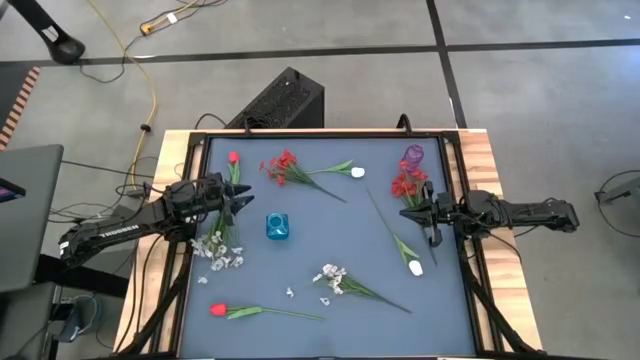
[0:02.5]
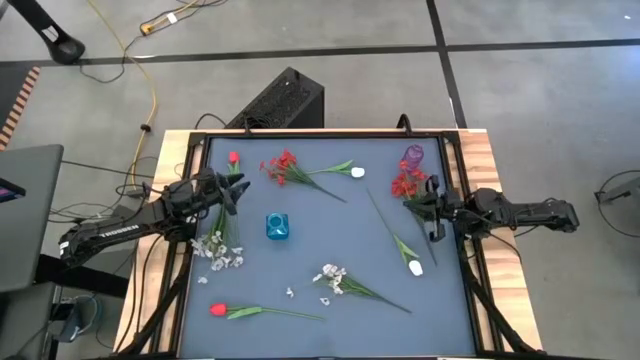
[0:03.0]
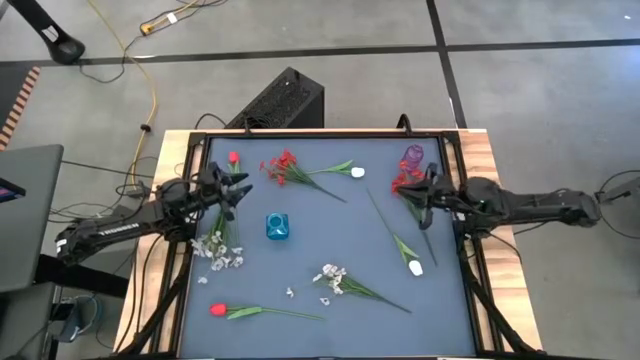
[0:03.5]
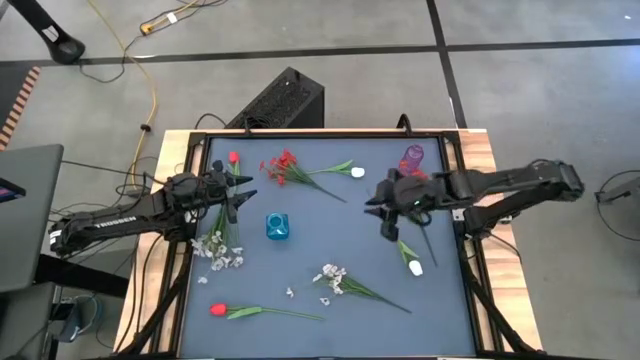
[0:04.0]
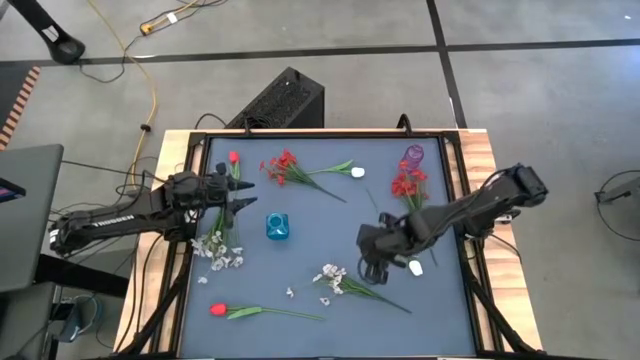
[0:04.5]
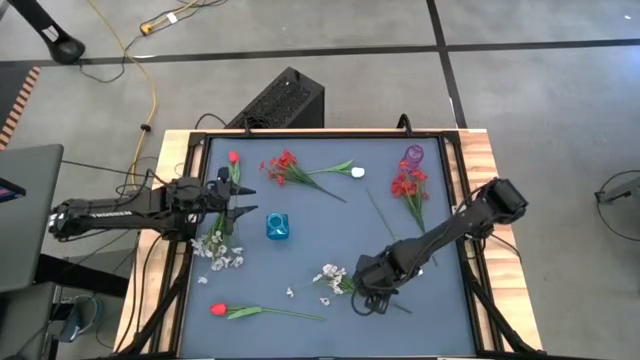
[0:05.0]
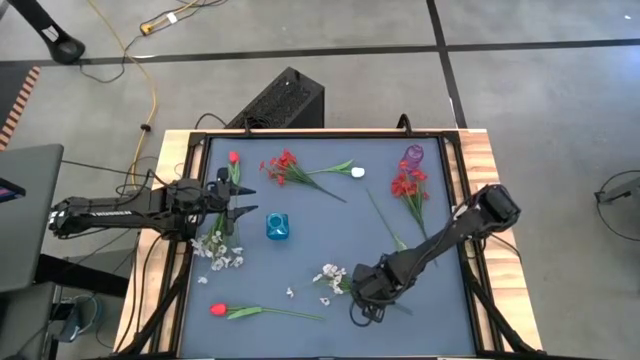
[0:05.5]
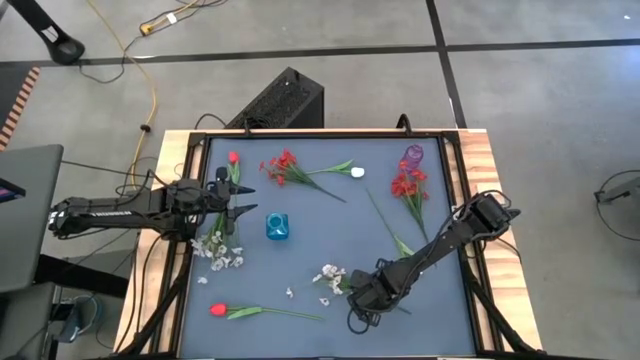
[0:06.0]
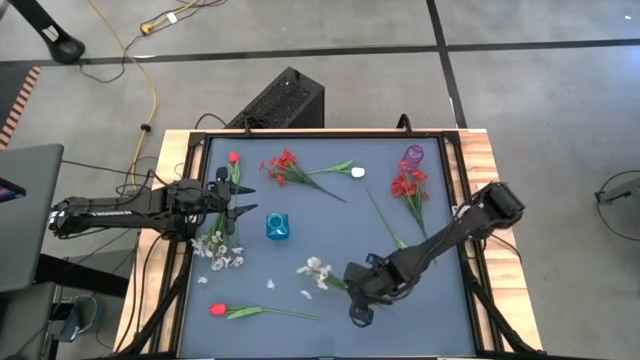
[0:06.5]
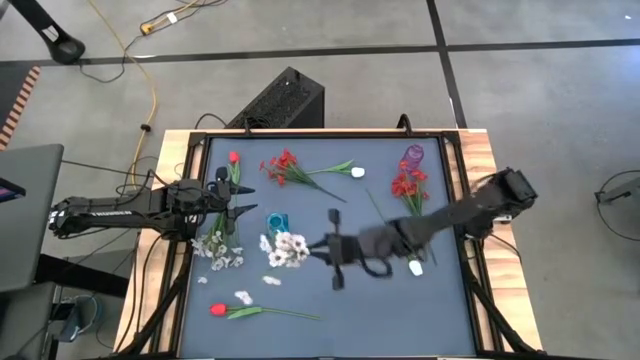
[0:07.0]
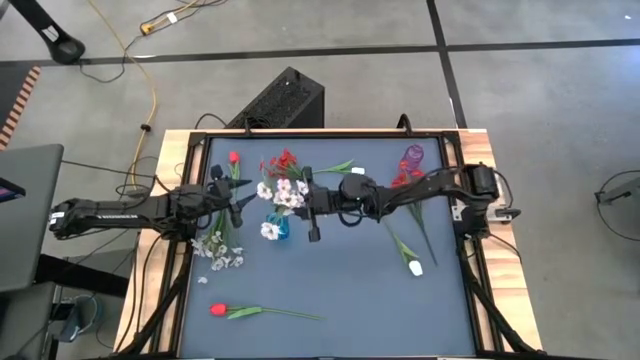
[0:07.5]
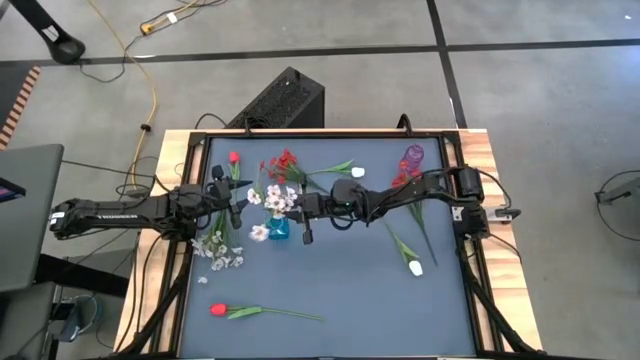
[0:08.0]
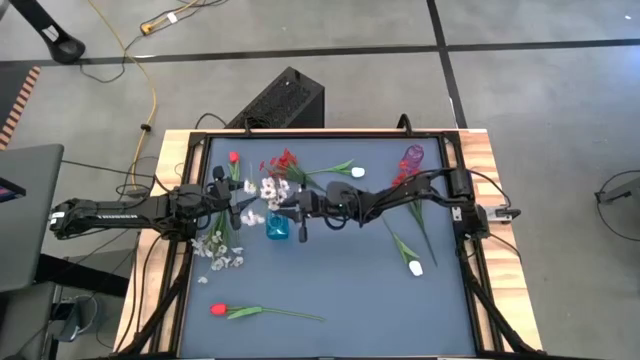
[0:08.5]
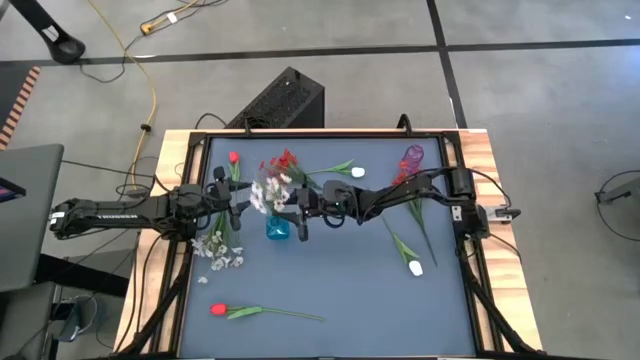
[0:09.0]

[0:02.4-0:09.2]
Task: Sort flowers into vase by color
Put the bottom white flowers into the blue vase

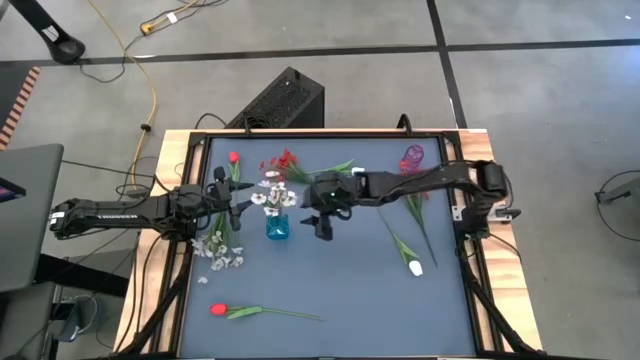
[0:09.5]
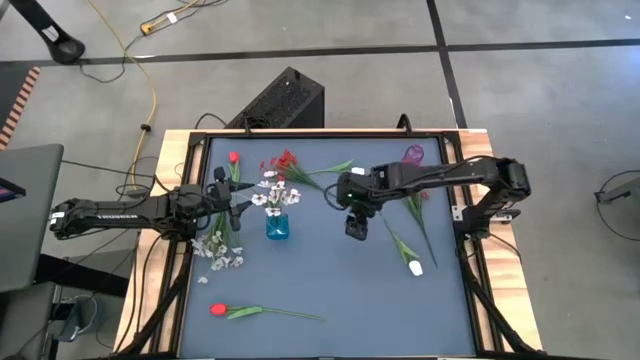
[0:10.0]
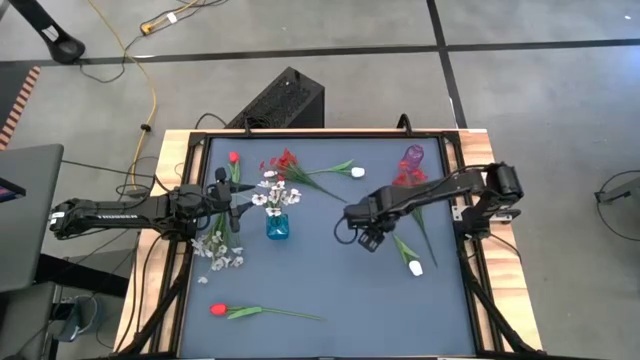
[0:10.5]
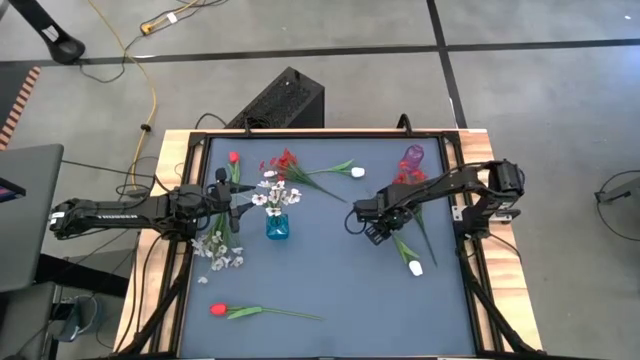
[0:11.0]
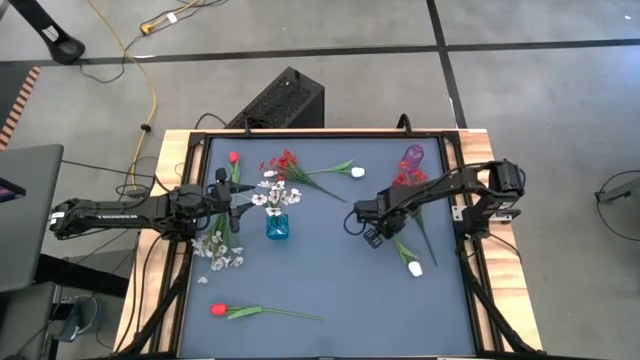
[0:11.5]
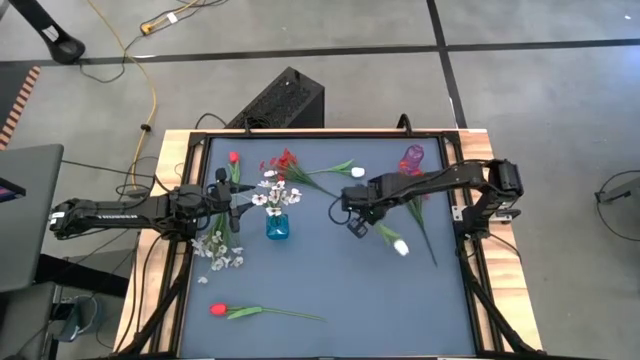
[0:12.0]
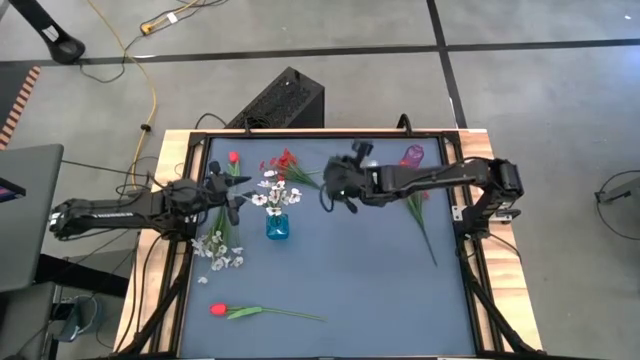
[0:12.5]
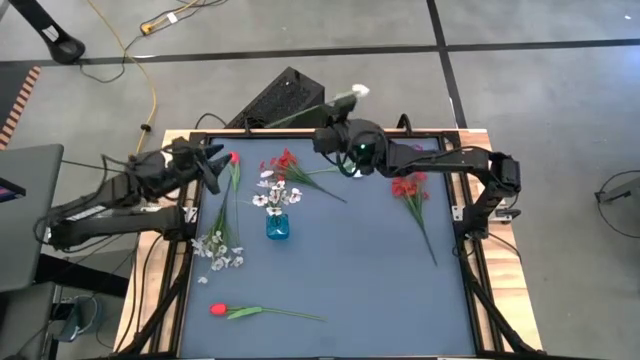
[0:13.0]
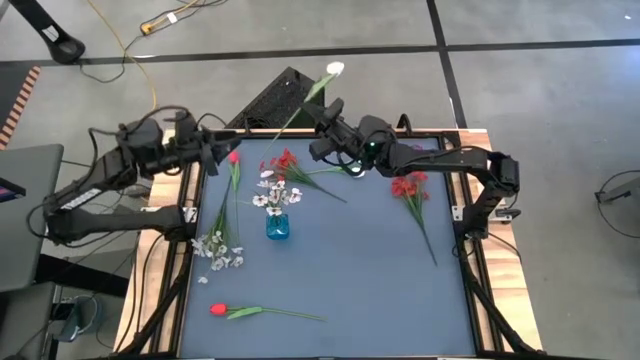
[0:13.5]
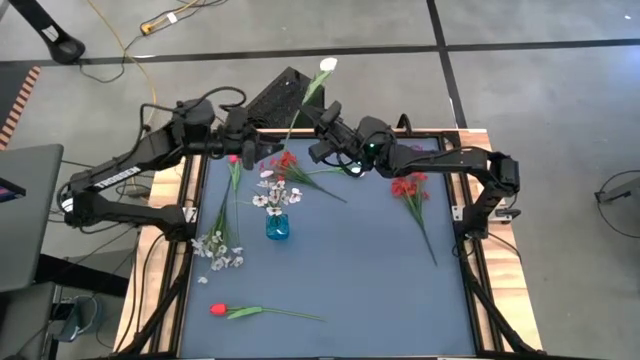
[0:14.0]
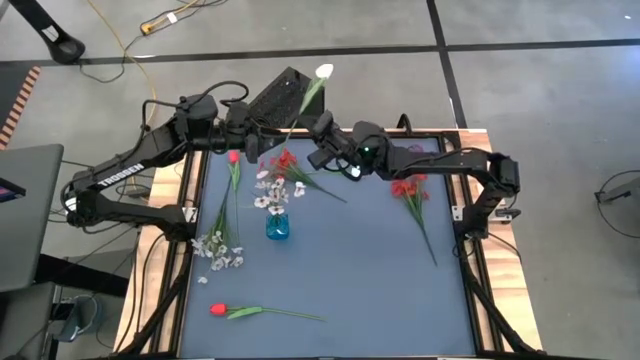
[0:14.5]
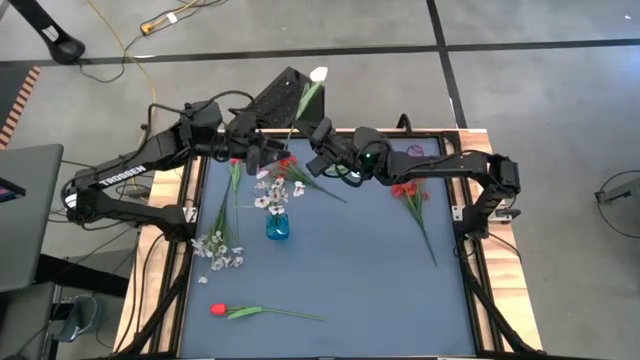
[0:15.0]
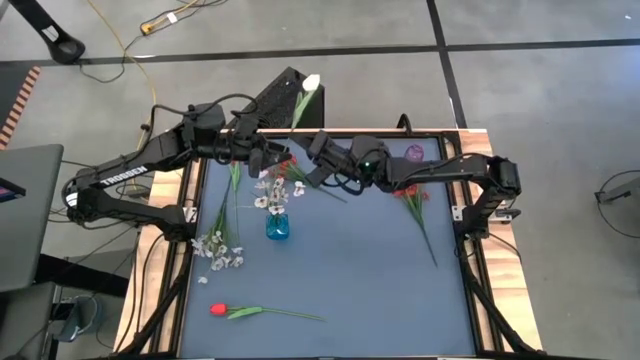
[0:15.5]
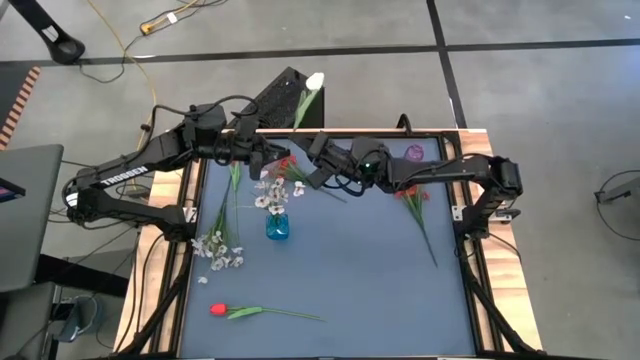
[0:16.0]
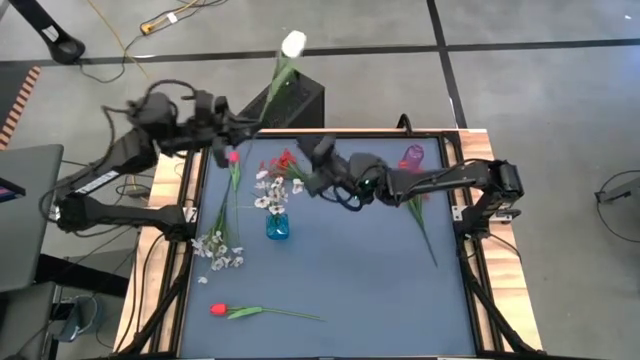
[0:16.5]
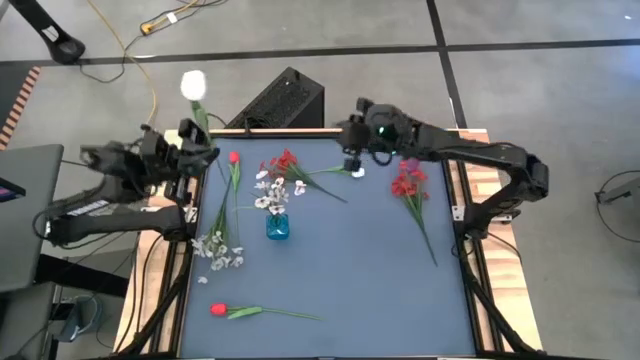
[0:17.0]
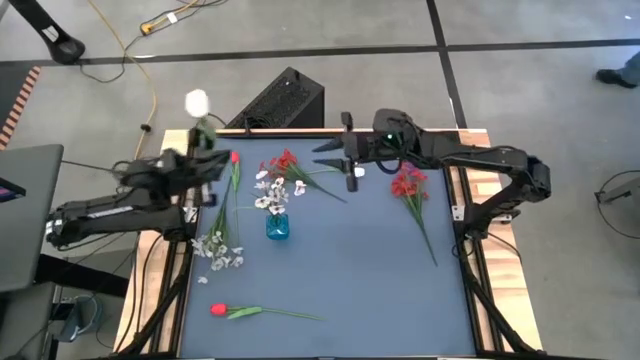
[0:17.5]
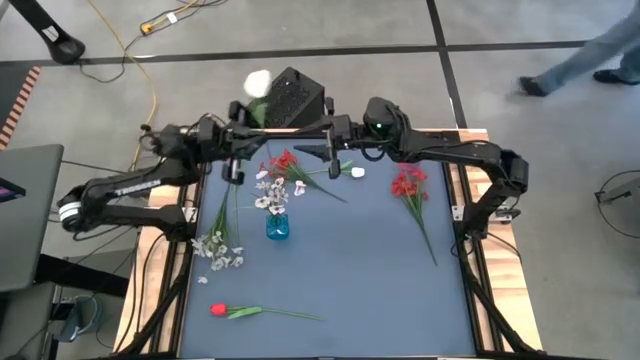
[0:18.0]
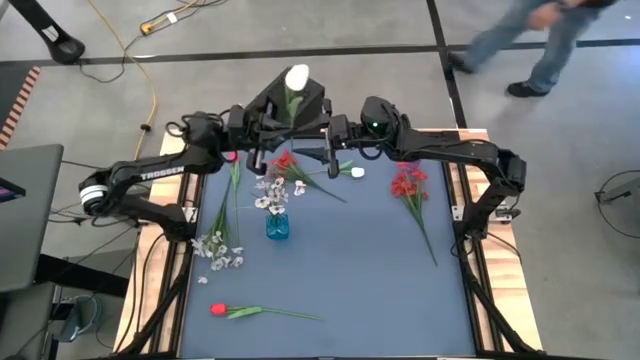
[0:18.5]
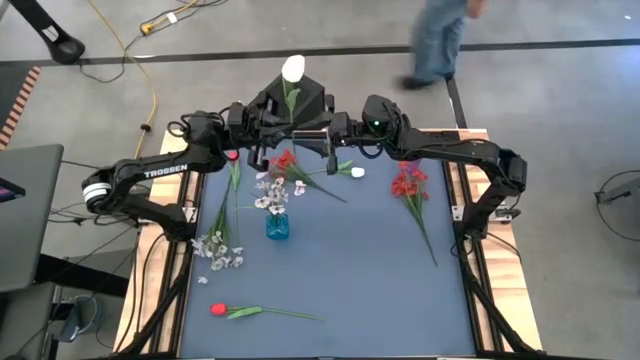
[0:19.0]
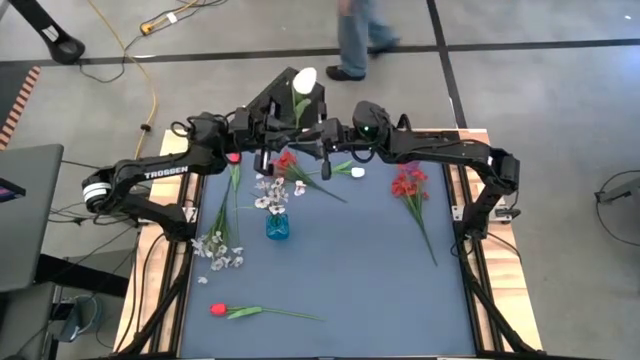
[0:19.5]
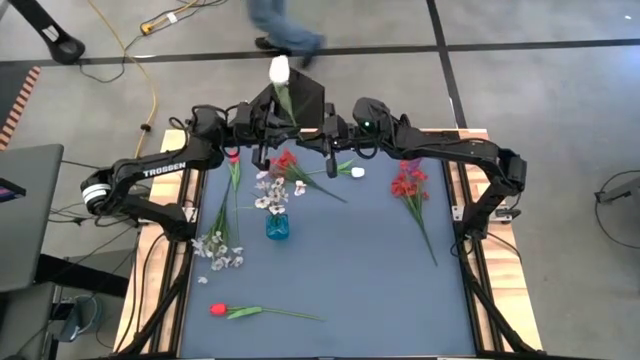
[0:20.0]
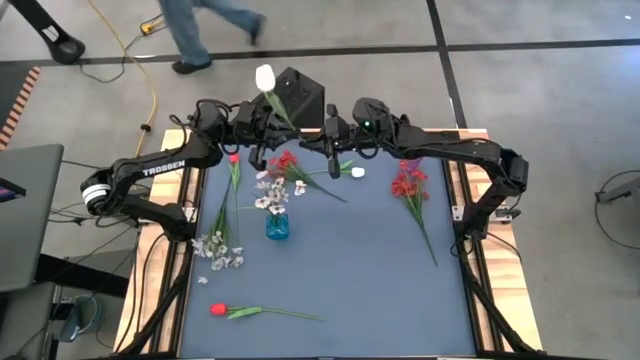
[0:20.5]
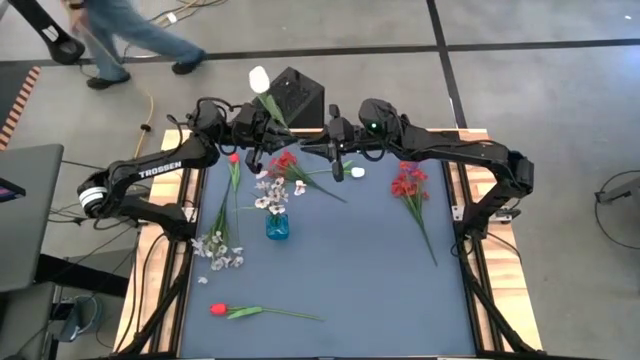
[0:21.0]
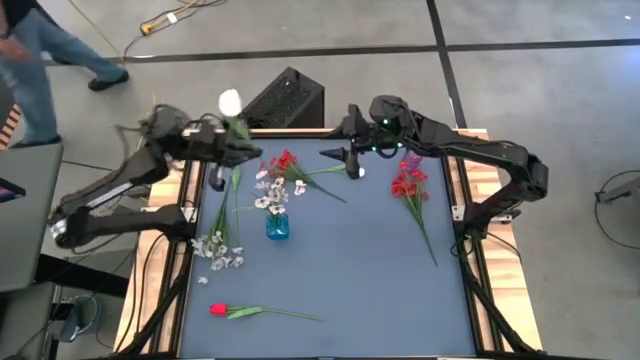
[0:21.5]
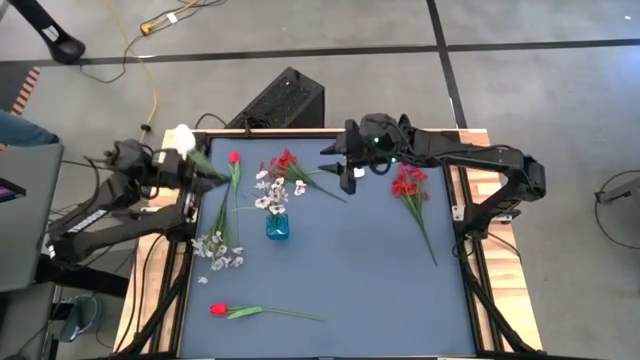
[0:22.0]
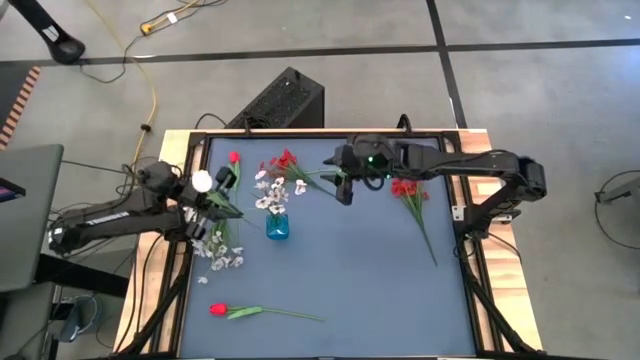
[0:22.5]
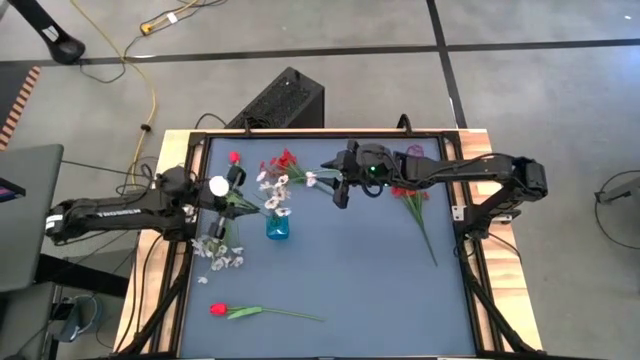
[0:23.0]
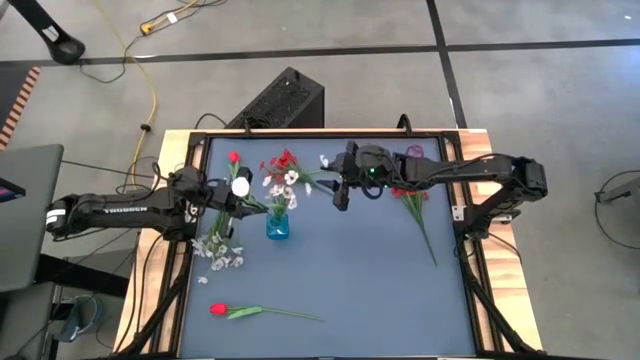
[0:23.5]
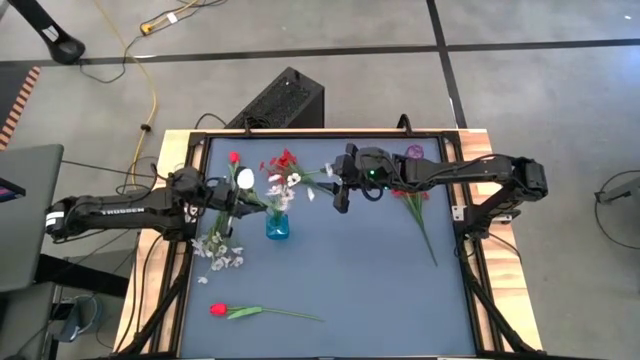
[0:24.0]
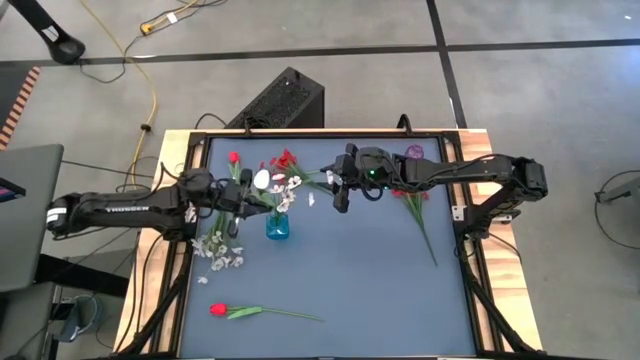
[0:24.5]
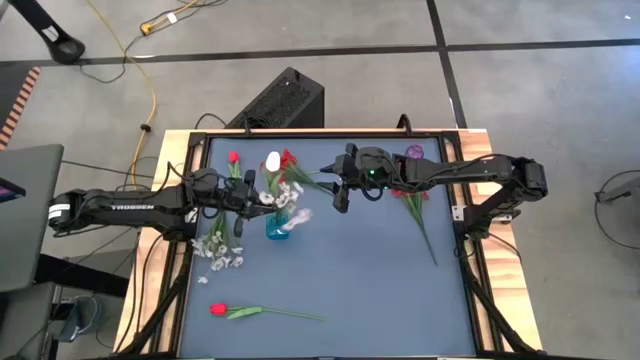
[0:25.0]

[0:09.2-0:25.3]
Put the right white flower into the blue vase
